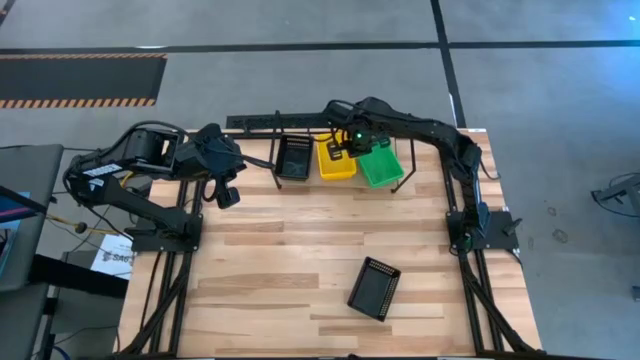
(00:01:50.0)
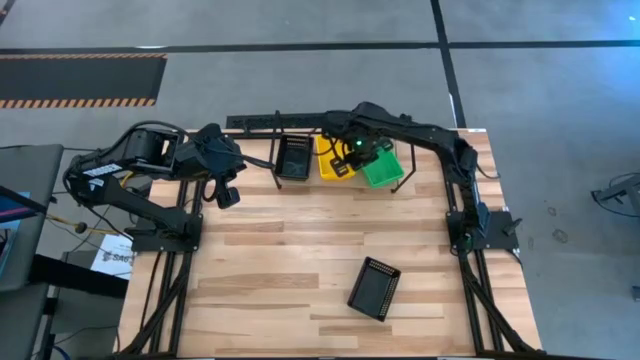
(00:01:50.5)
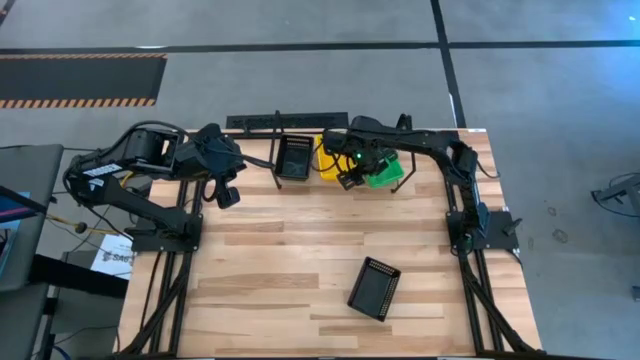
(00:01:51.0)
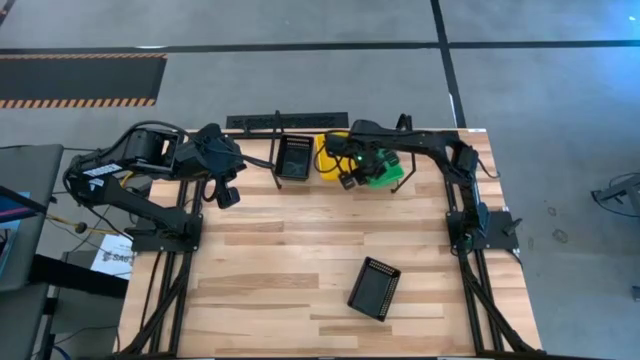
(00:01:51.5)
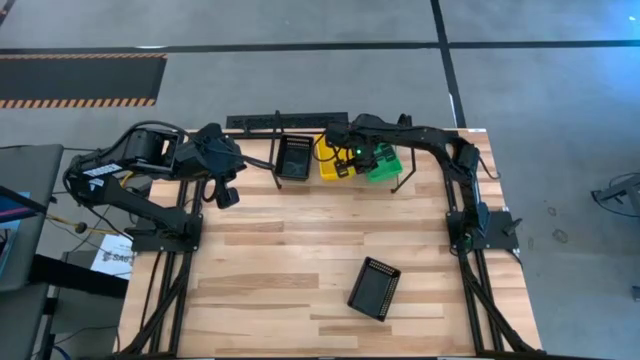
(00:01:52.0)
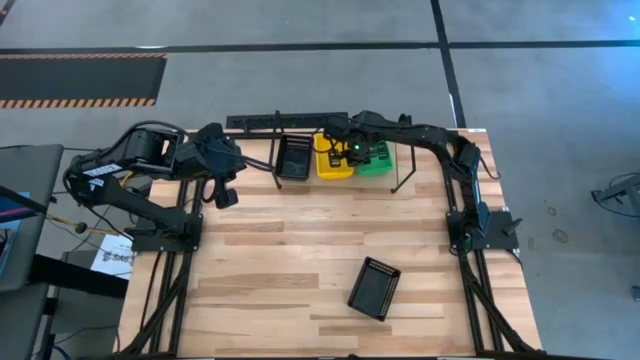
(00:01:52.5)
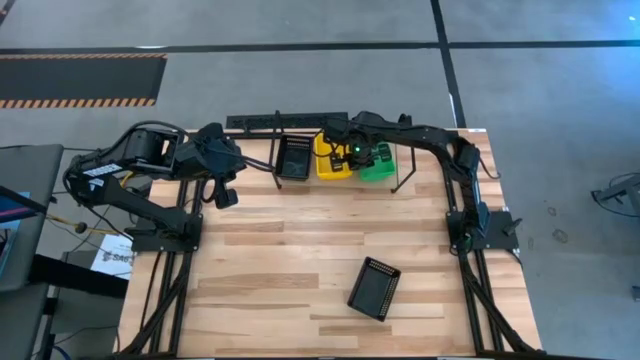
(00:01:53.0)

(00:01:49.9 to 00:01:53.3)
Task: Stack baskets on shelf by color
Adjust the green bin on the shelf

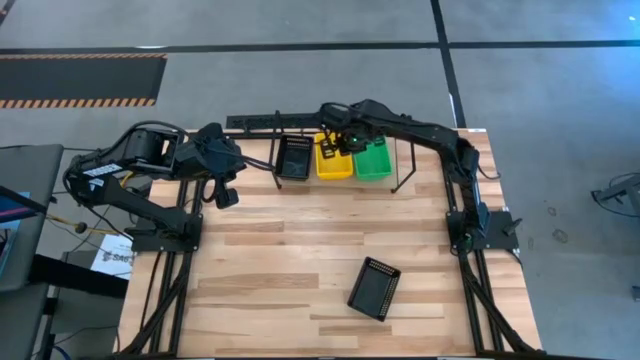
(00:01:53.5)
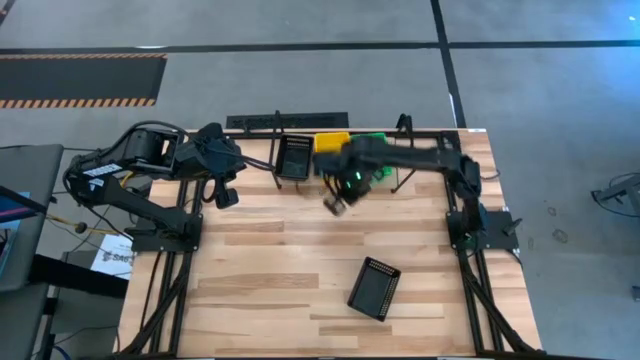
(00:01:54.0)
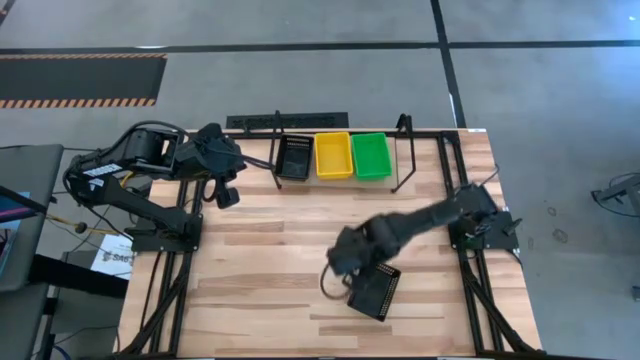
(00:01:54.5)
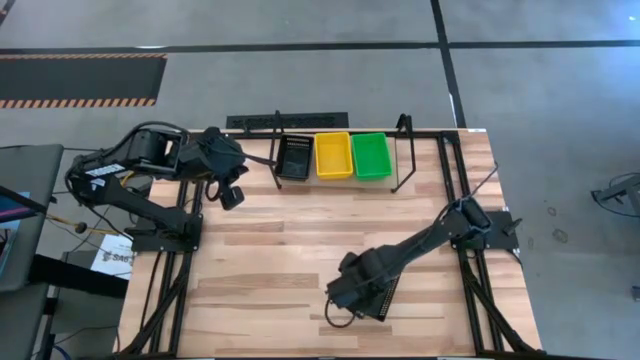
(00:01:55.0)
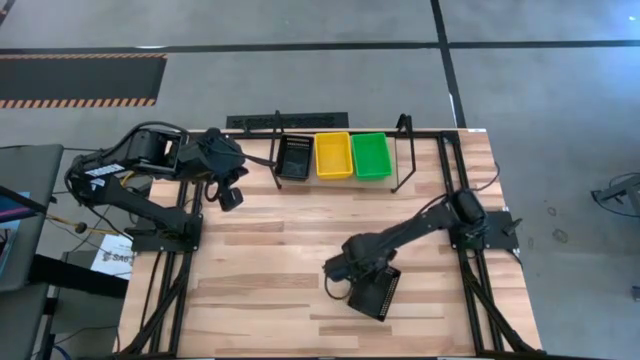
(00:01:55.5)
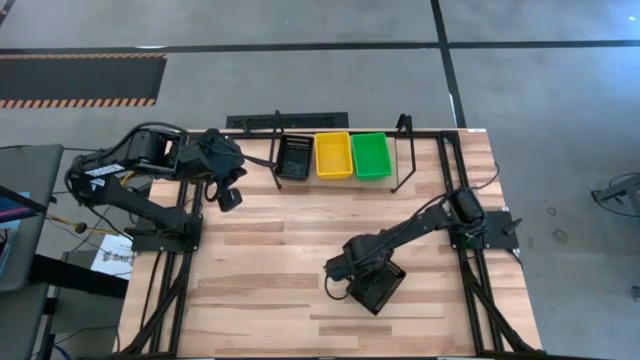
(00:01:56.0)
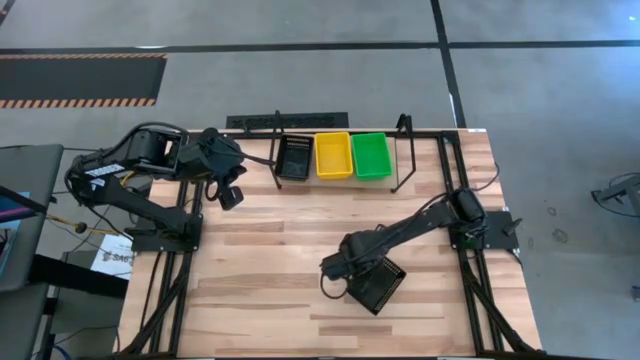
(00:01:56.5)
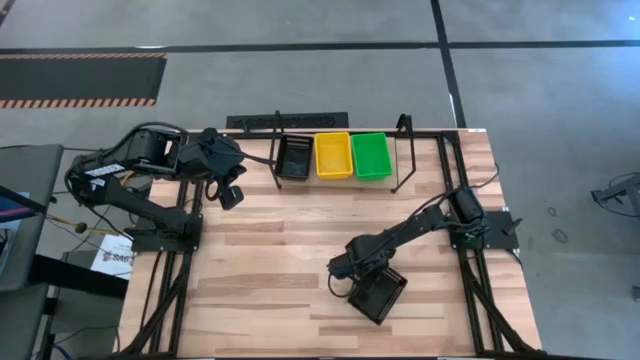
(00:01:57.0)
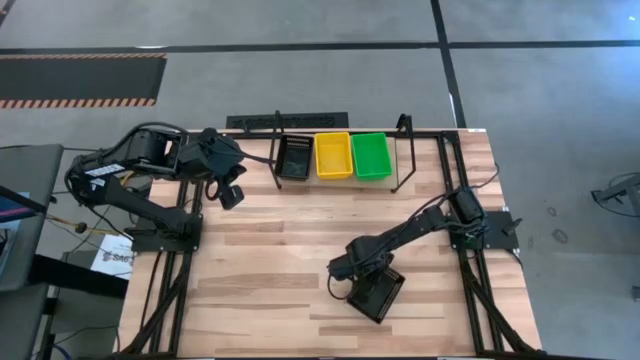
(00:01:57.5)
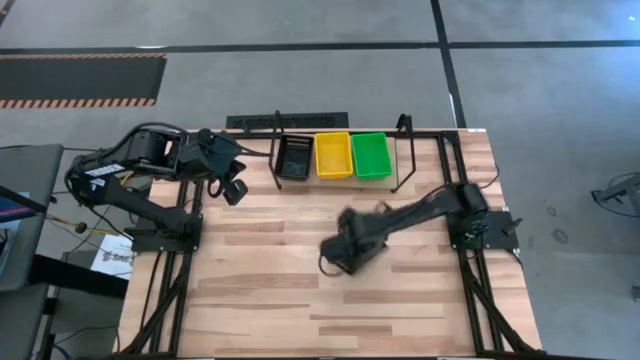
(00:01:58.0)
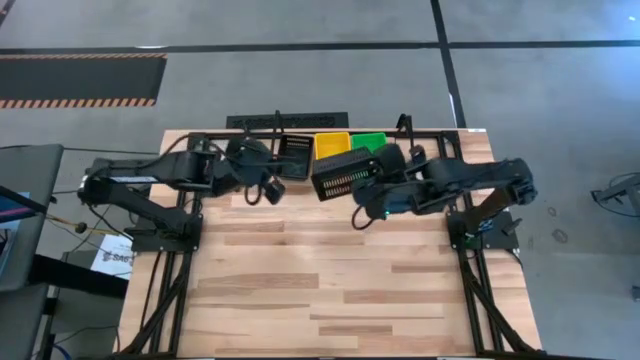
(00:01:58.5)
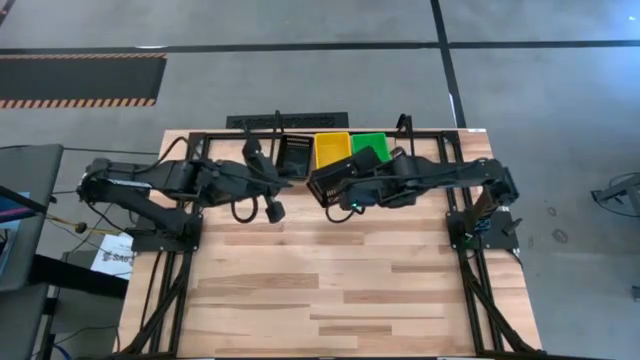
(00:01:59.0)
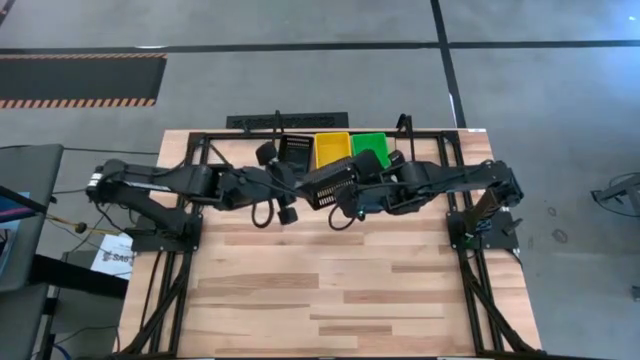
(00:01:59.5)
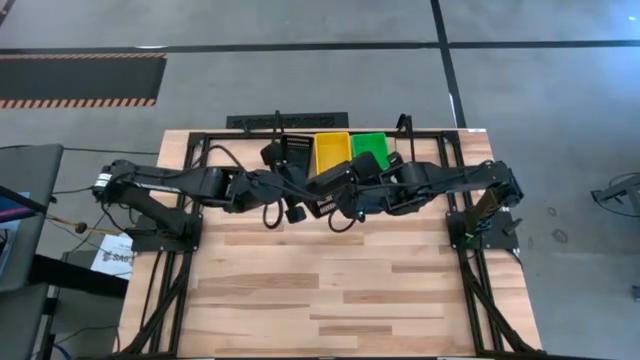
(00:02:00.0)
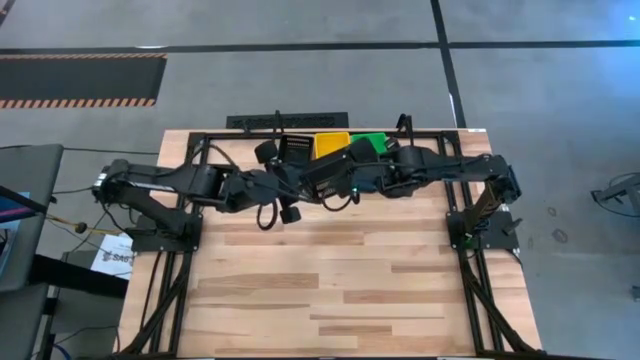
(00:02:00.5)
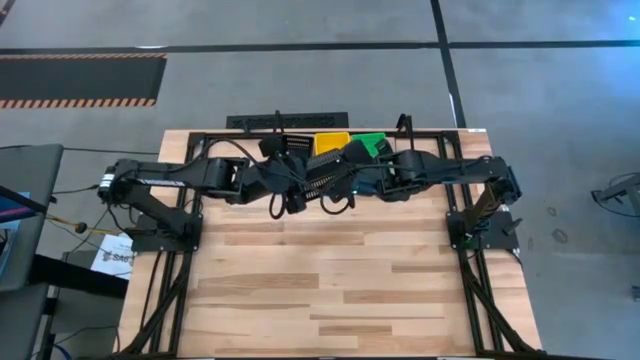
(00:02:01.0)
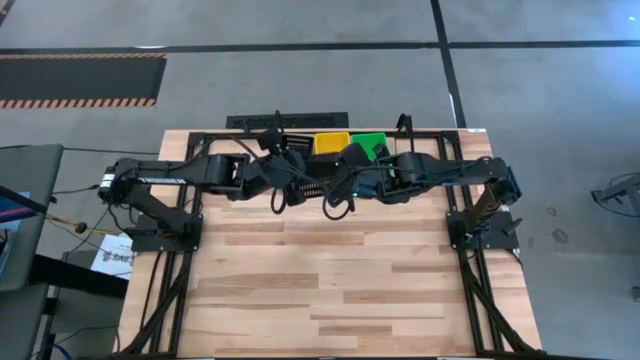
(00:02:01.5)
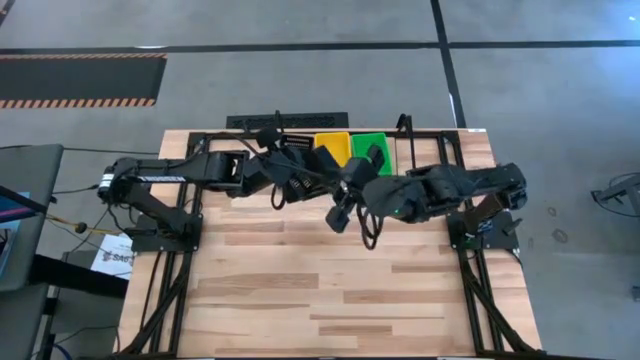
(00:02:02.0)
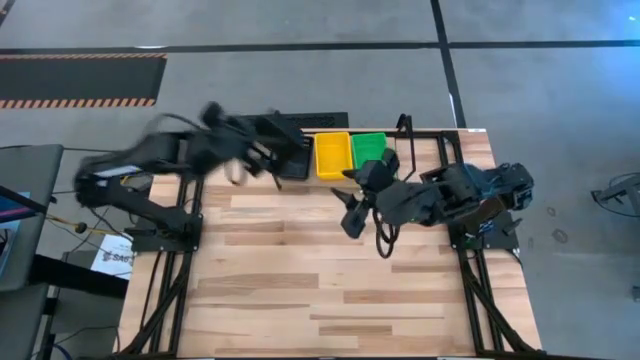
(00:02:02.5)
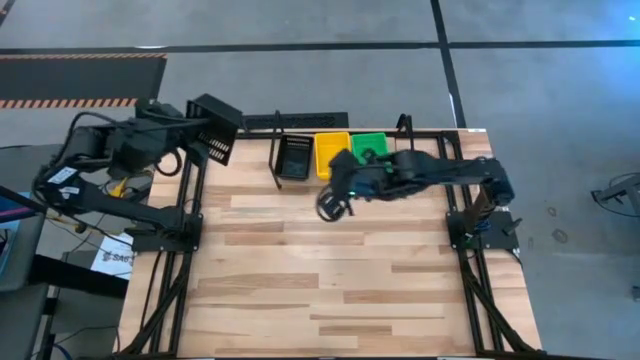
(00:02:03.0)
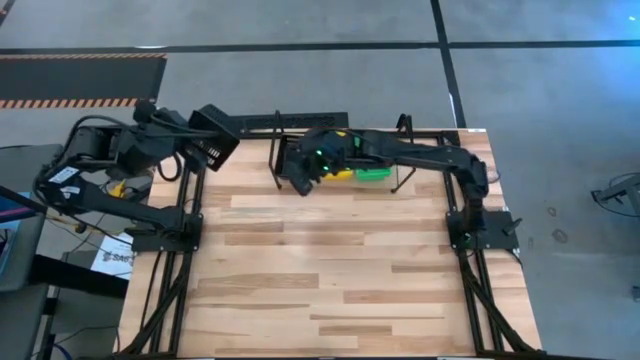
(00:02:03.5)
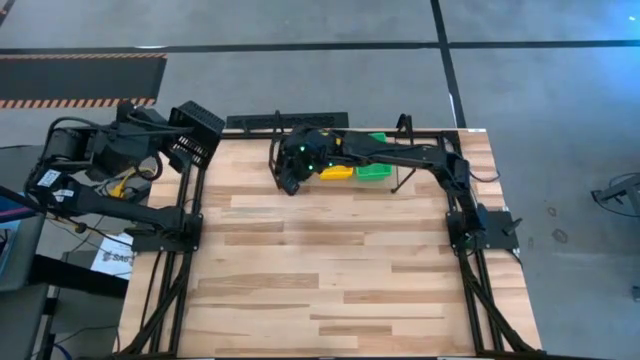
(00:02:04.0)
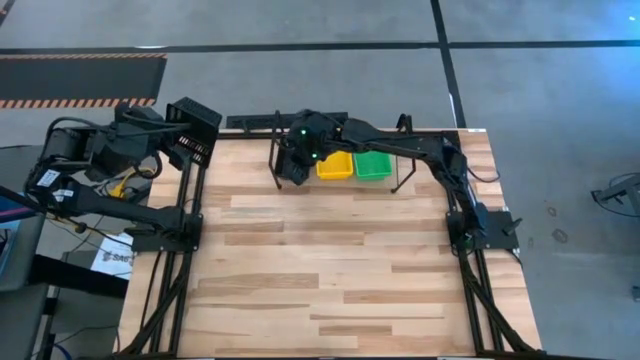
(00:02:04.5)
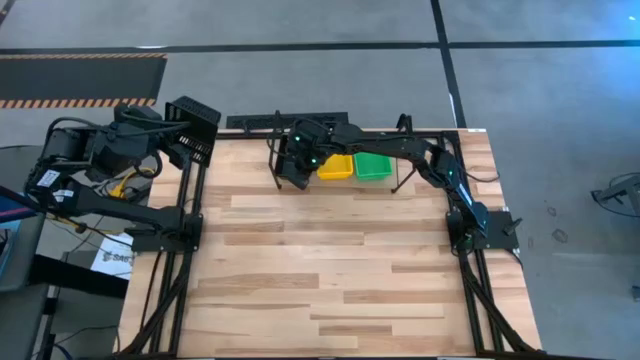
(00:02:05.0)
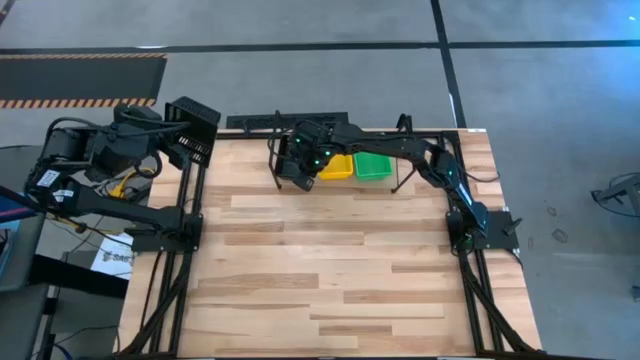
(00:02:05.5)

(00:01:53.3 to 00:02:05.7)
Stack the black bin on top of the black bins on the shelf

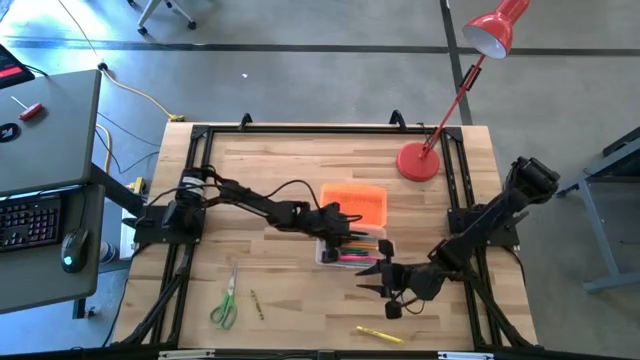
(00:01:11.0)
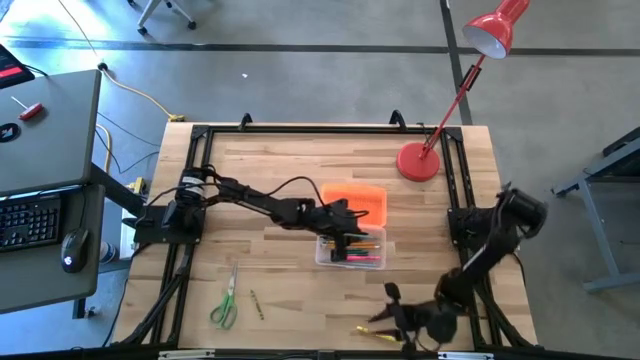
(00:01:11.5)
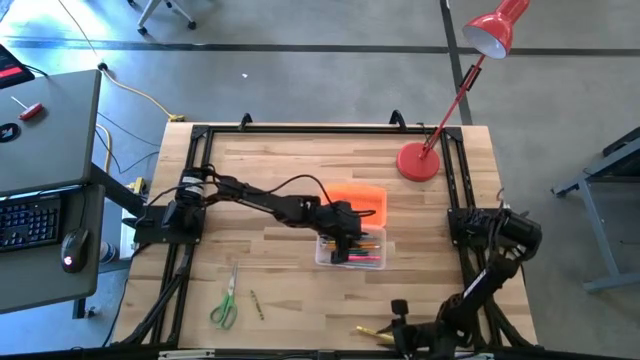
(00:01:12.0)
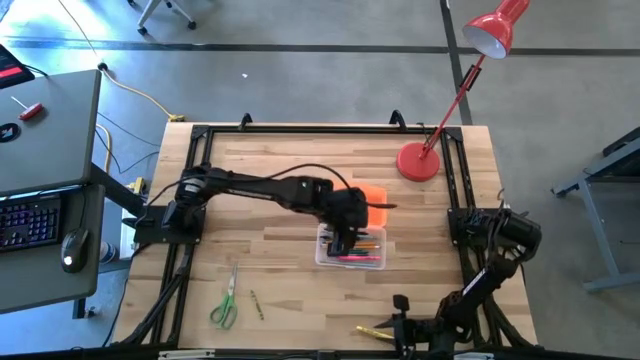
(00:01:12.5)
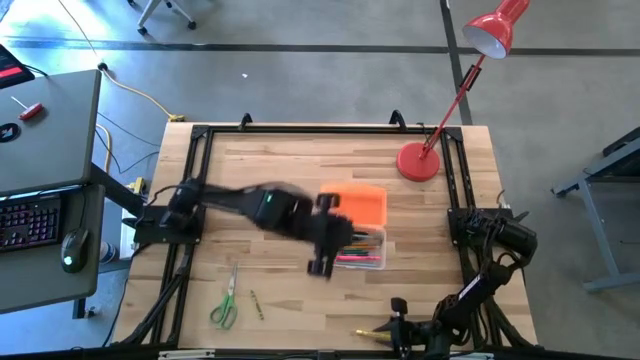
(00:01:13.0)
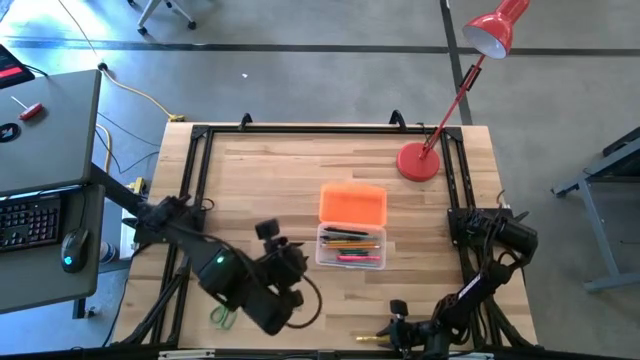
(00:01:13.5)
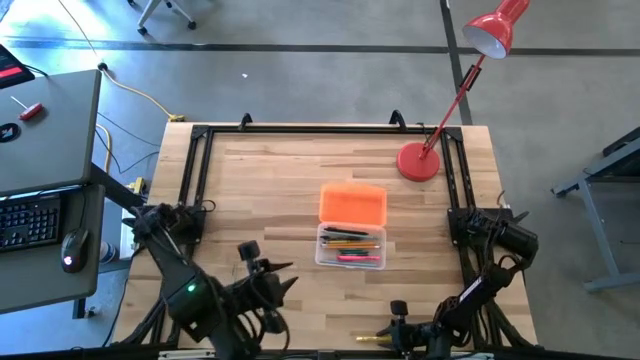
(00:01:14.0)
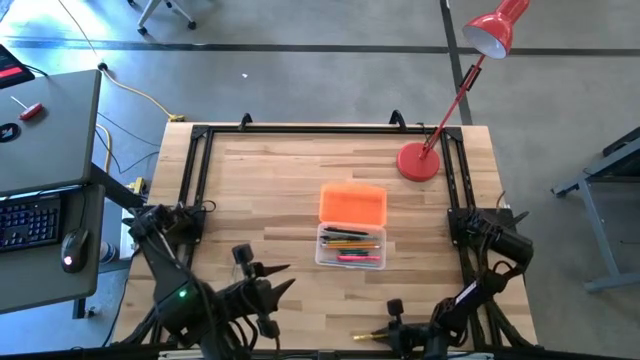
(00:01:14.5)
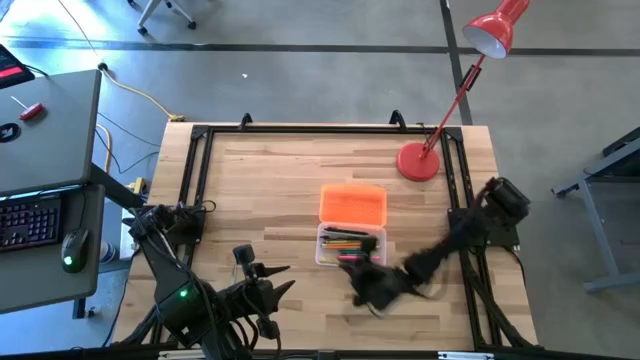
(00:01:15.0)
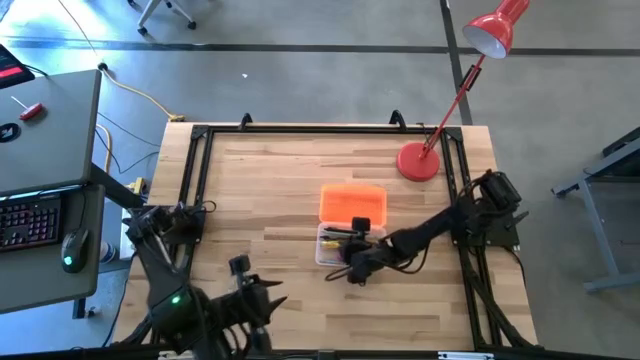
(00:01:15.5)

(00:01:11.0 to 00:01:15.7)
Task: Pick & place school supplies into a supply box
Put the yellow pen into the supply box
